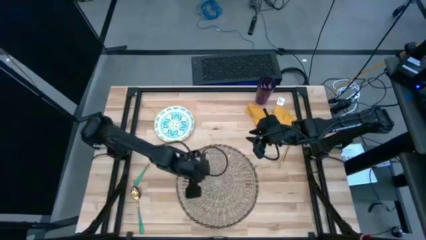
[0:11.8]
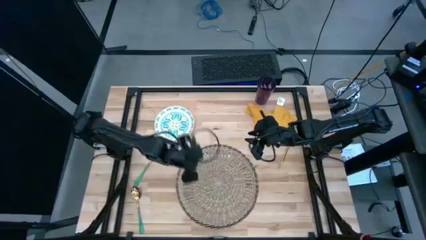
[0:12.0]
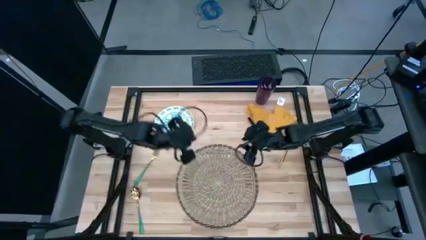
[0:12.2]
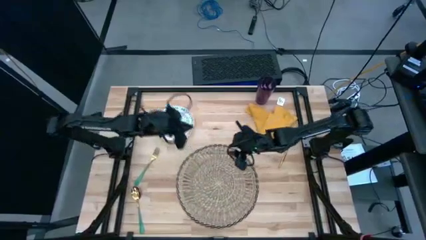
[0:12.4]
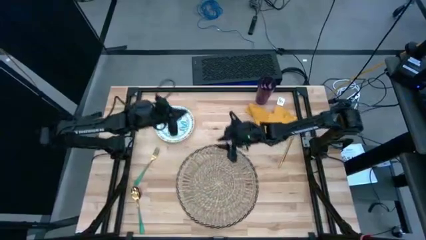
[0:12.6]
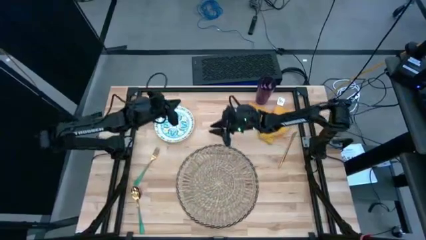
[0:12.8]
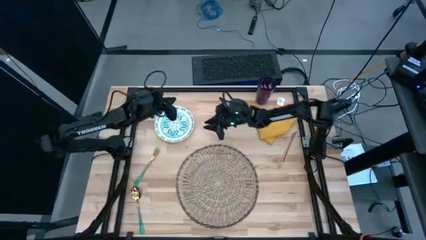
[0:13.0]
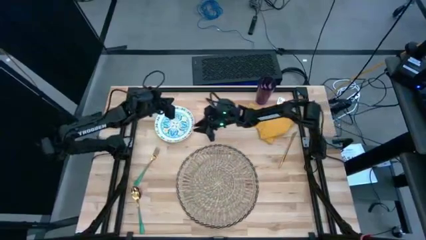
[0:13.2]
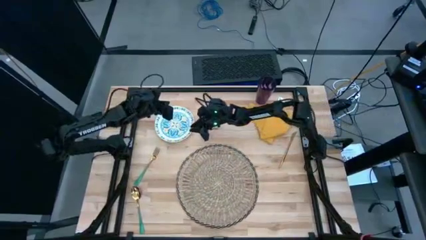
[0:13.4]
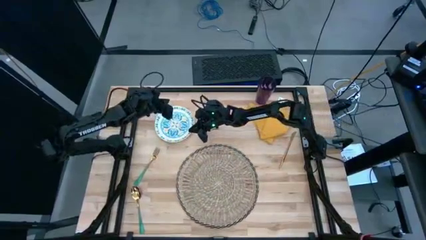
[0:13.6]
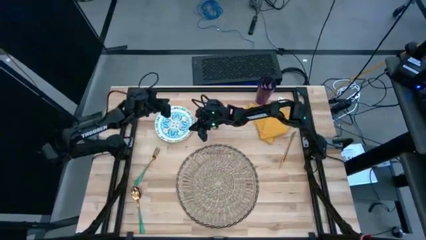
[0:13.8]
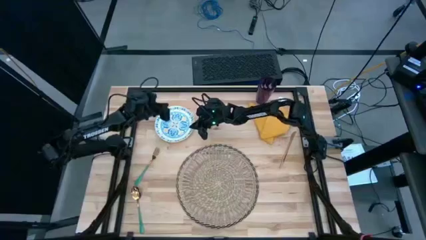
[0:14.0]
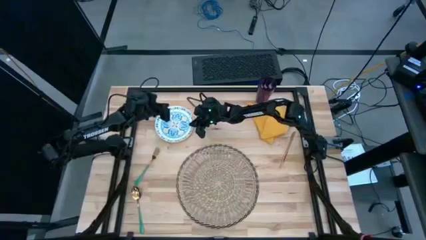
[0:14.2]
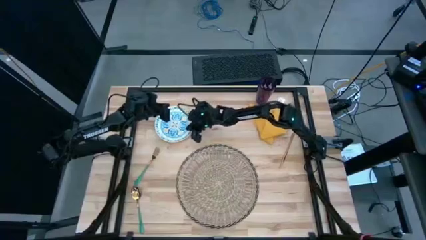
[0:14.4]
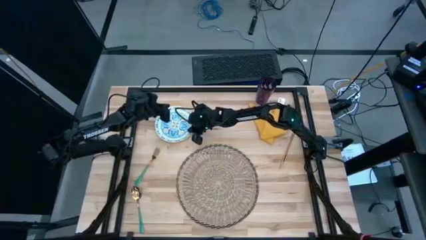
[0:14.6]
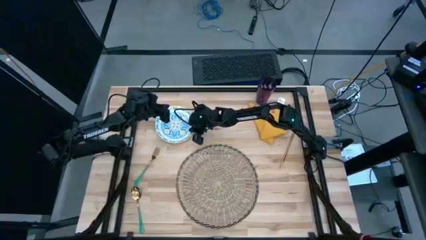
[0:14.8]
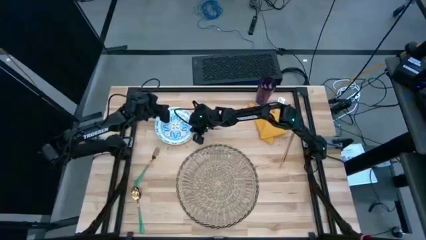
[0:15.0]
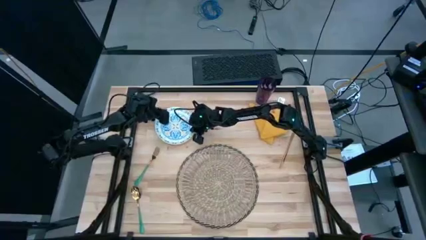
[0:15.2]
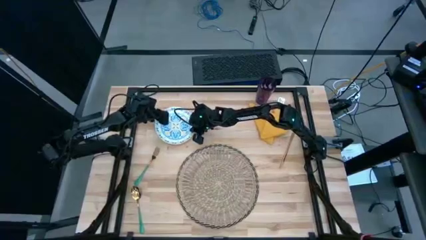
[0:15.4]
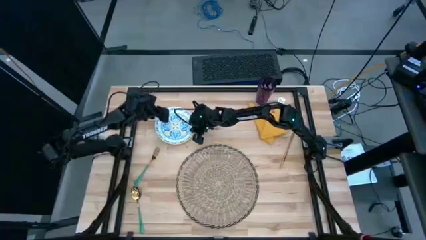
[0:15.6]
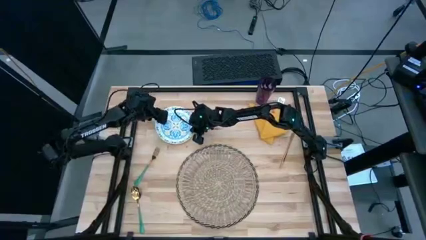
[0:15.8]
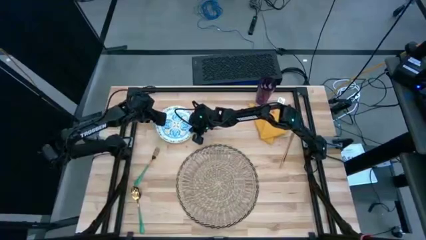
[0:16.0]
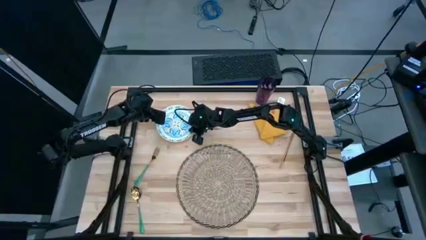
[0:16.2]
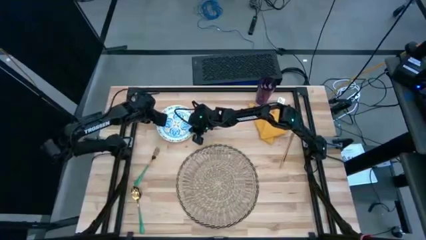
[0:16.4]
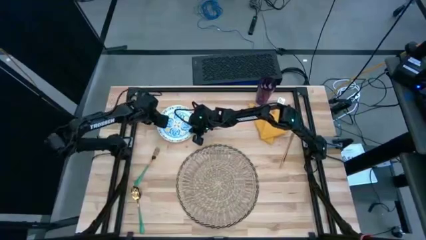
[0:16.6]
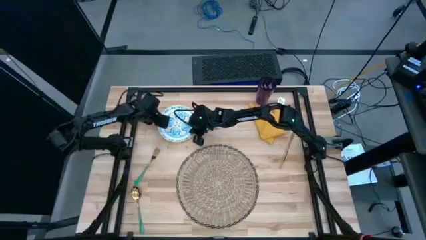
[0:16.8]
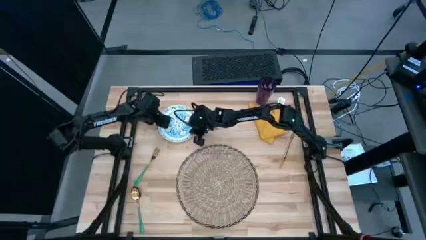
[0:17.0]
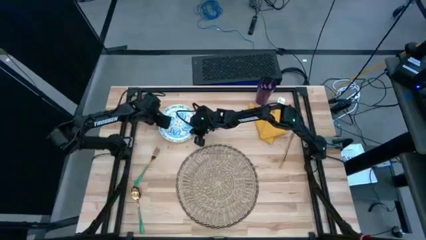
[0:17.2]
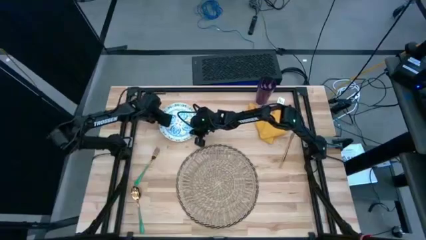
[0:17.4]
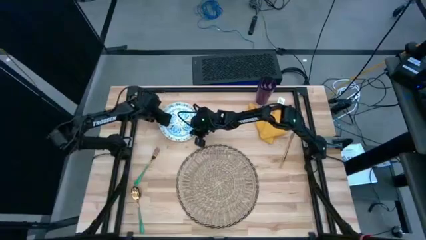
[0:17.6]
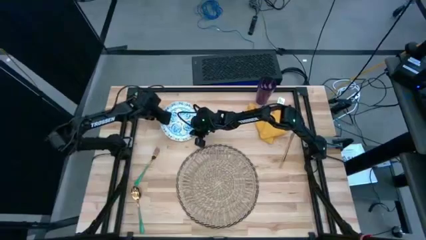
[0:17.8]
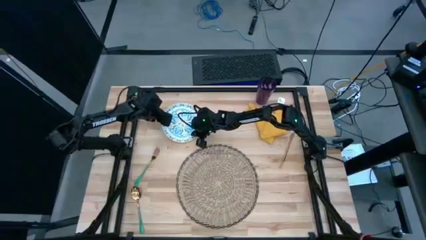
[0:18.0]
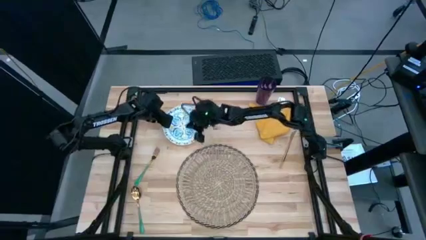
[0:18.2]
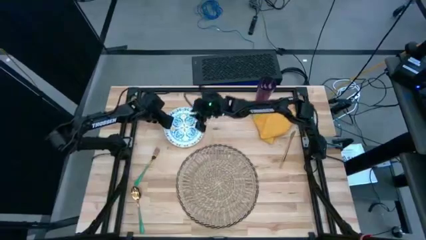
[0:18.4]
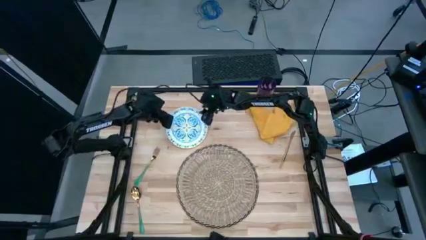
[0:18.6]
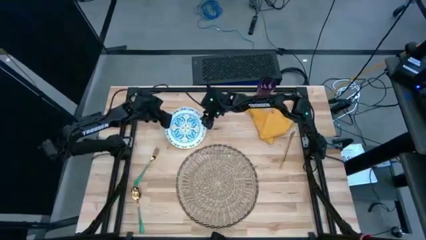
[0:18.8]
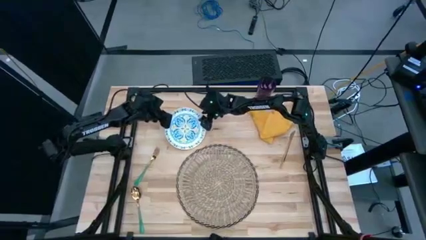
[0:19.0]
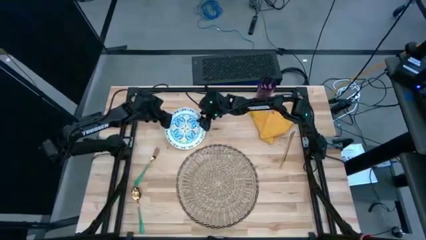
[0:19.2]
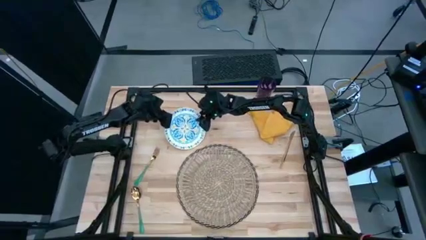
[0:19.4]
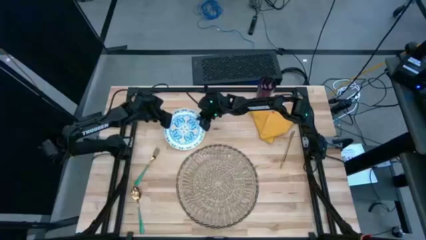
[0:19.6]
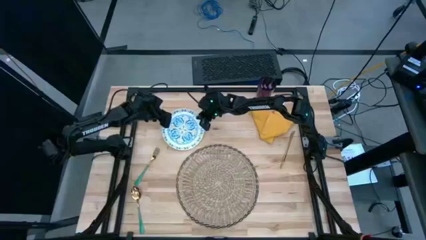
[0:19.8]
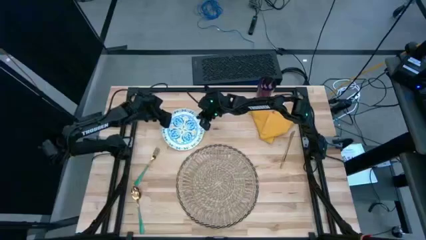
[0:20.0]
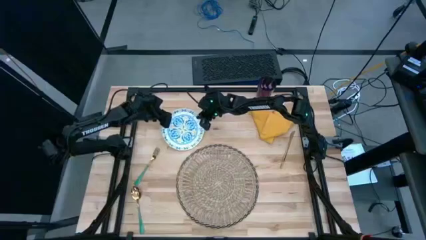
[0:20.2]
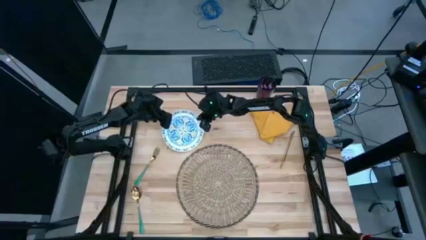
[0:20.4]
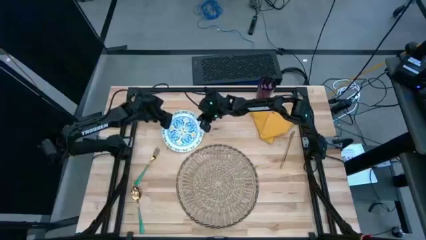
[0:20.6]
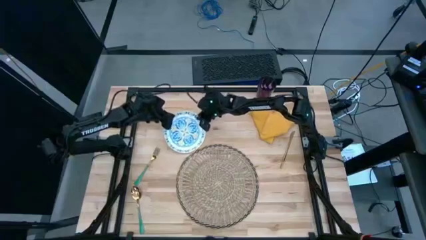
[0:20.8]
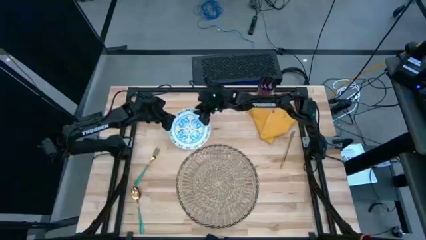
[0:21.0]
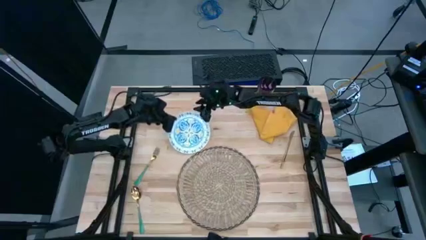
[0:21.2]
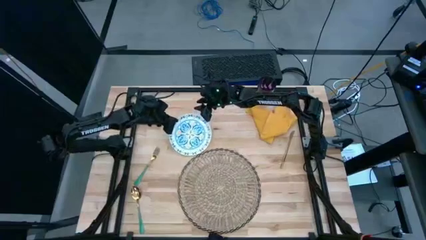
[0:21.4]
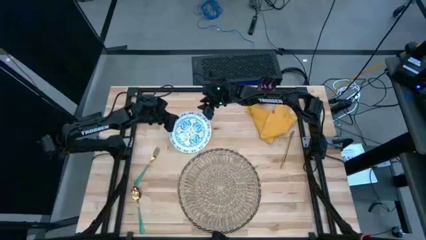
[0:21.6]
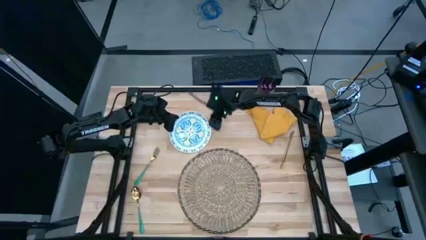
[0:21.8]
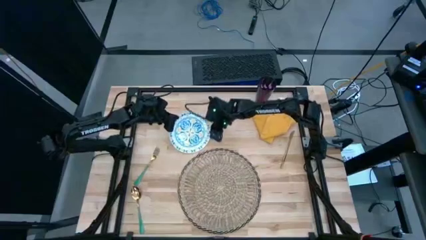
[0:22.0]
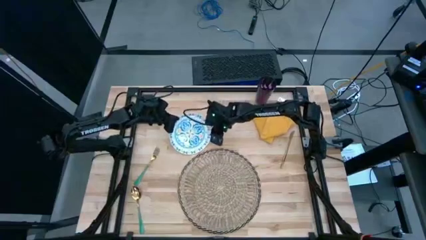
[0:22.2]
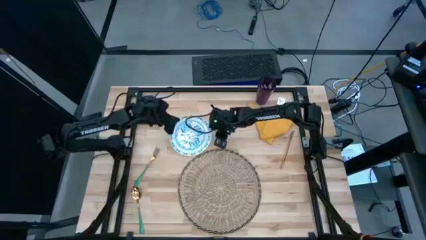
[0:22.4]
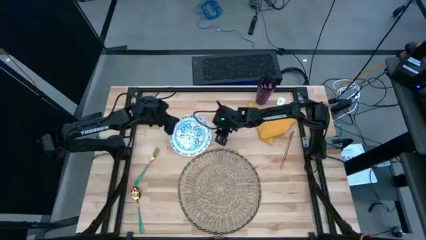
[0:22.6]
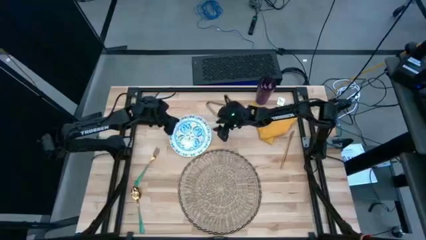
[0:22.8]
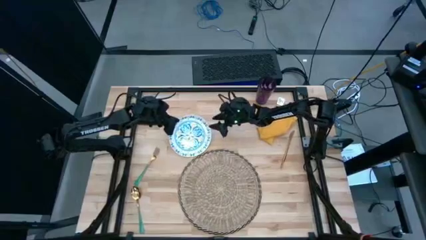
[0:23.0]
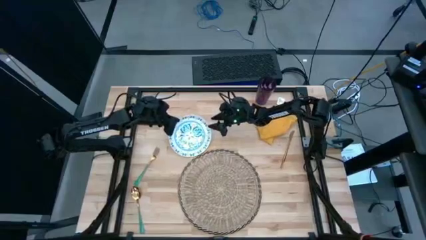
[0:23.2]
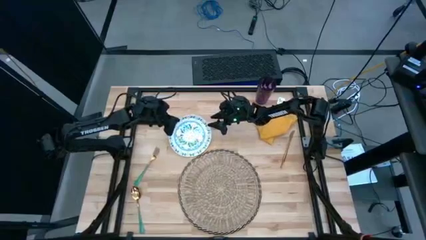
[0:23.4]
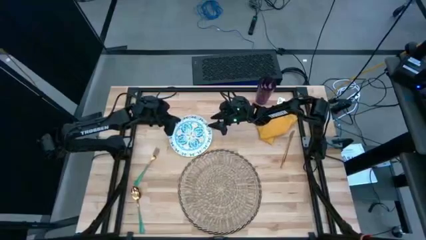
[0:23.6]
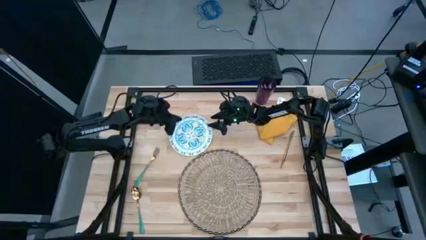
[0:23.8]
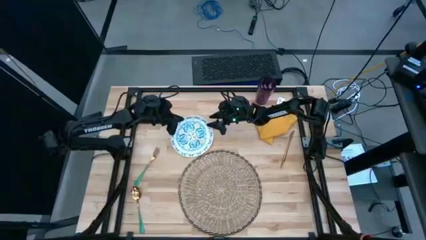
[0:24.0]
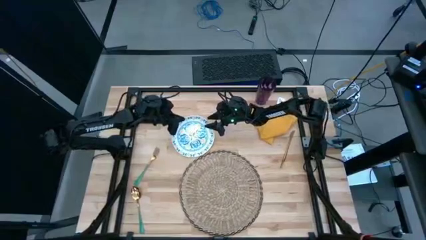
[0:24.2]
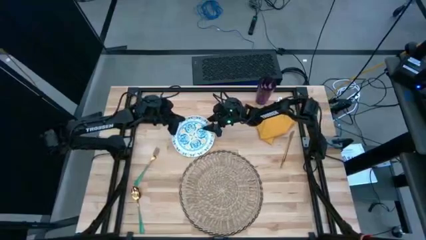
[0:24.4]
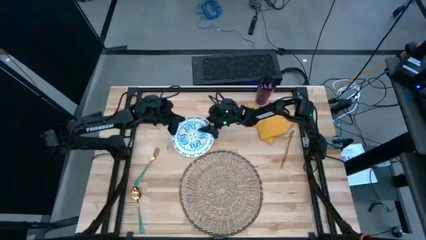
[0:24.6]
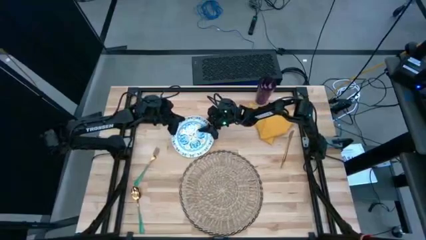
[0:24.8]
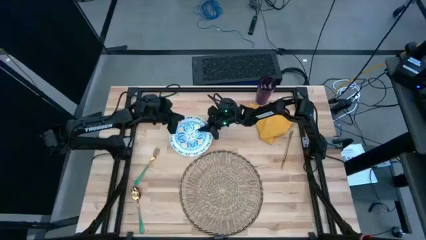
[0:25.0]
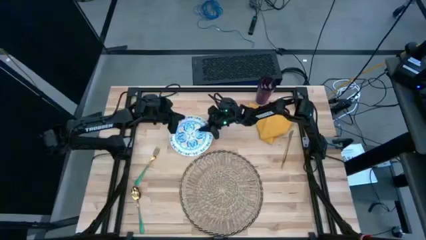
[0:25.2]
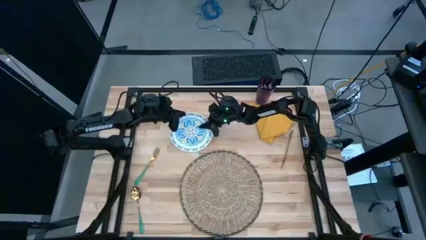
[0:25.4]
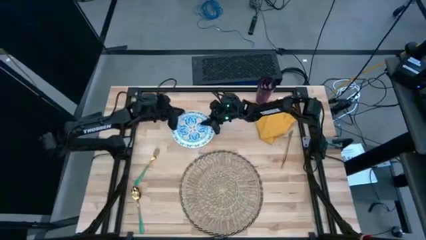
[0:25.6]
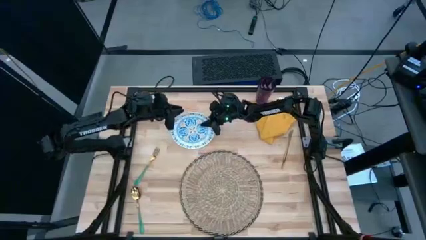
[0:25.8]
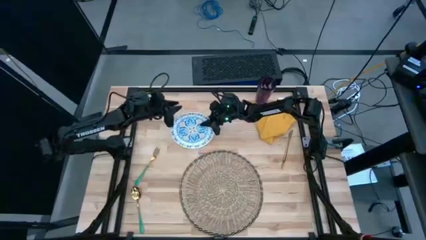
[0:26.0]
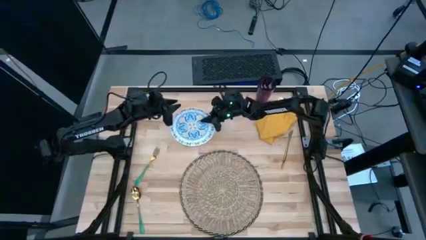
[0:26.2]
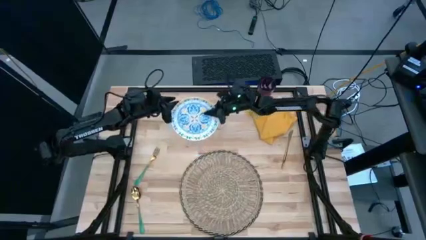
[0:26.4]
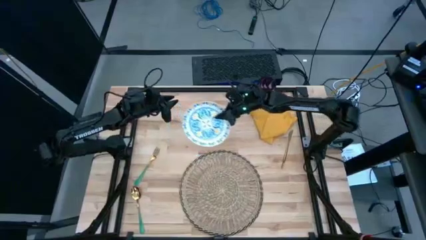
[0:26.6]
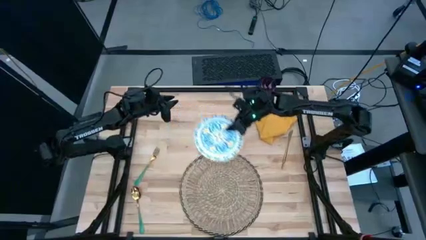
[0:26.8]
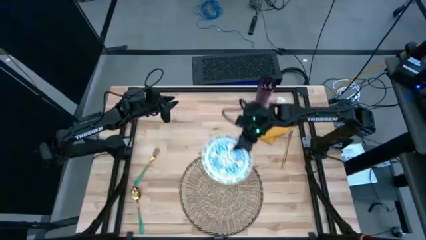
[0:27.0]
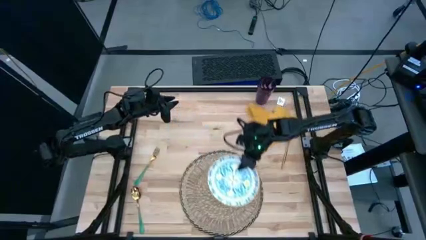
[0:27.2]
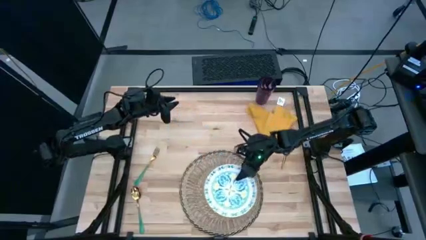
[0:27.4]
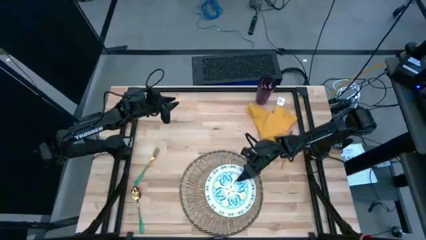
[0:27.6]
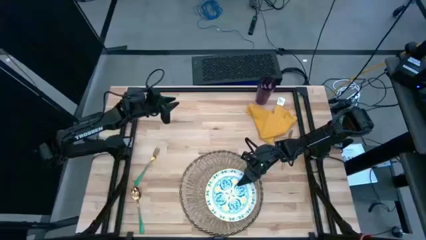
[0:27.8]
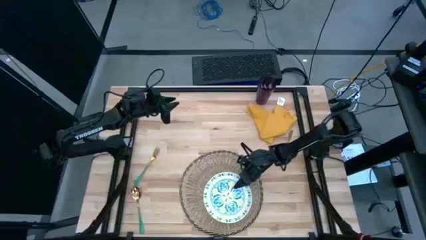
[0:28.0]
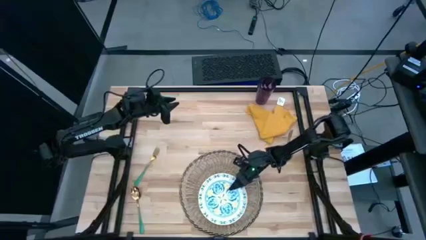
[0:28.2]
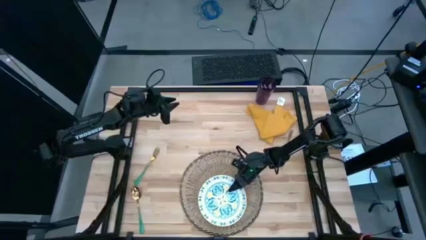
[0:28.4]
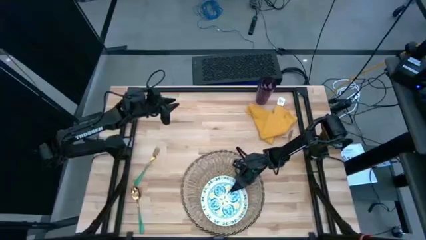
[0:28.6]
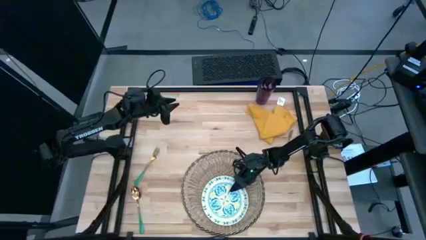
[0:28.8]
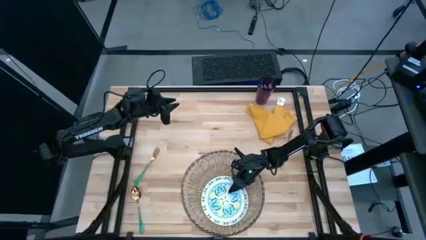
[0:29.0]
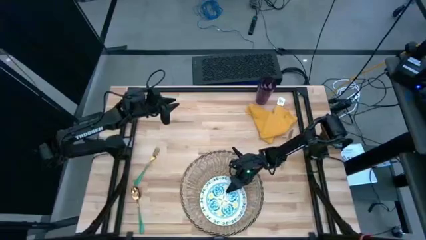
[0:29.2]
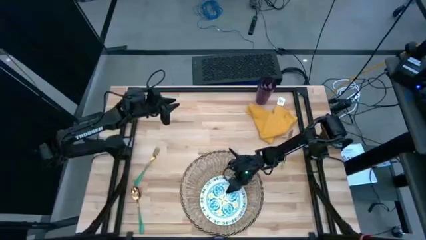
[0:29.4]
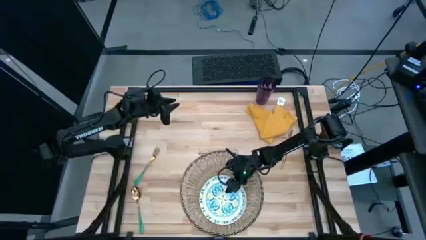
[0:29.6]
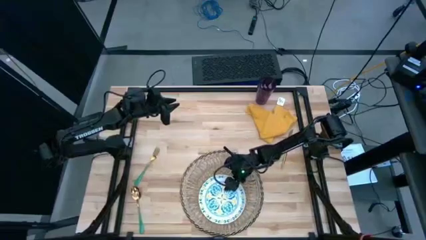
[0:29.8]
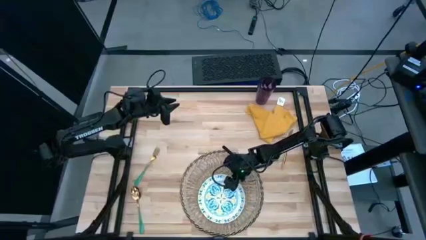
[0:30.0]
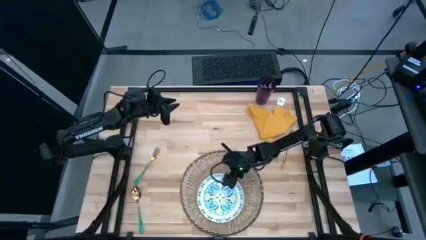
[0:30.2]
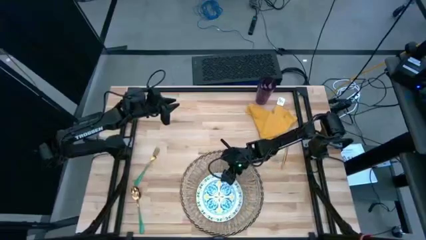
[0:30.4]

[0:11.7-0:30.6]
Task: Set table place
Put the white patterned plate on the brown placemat
